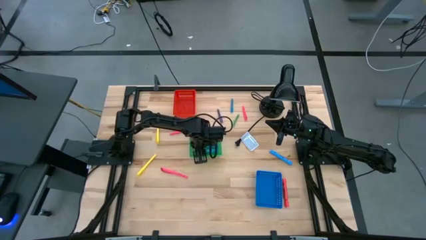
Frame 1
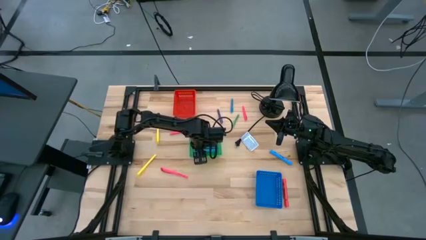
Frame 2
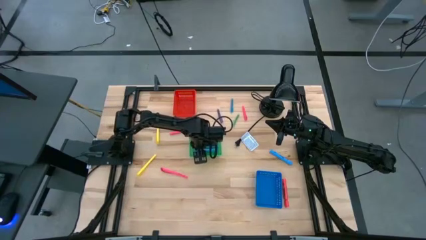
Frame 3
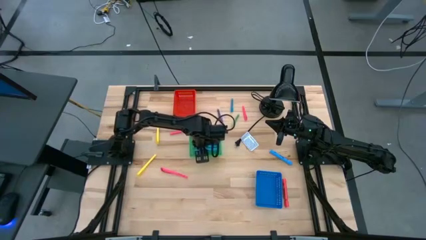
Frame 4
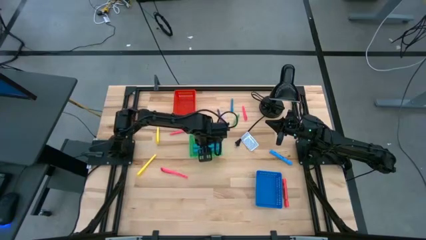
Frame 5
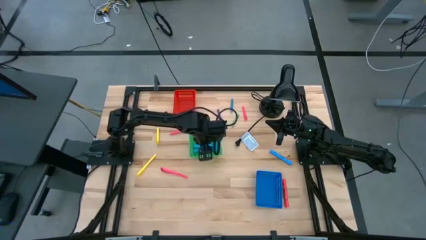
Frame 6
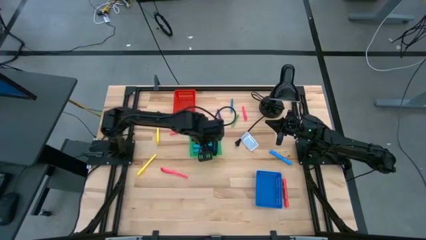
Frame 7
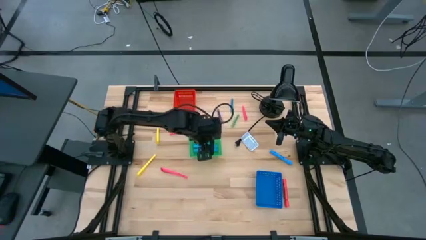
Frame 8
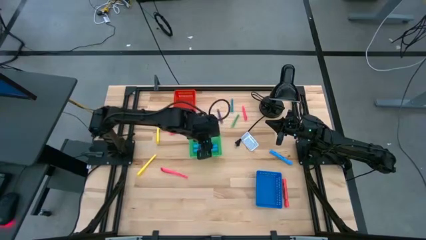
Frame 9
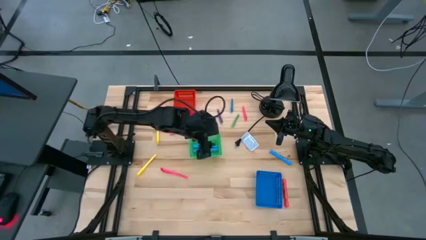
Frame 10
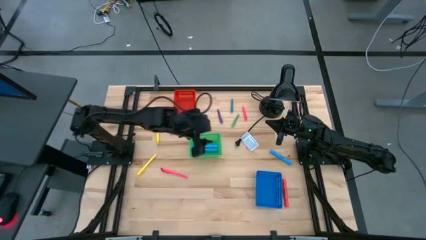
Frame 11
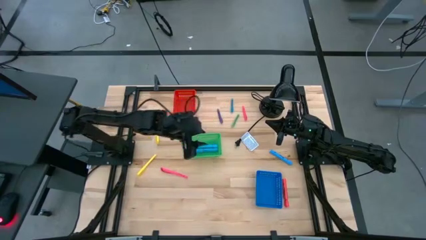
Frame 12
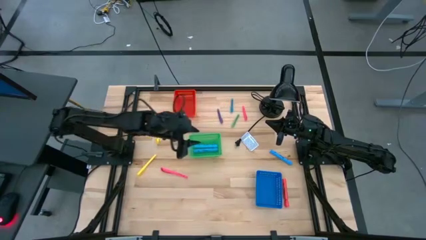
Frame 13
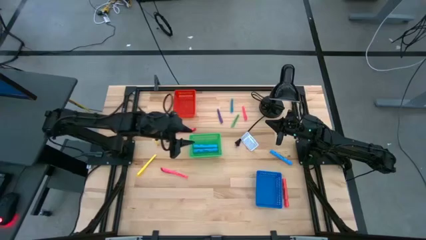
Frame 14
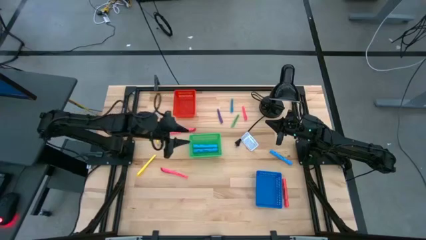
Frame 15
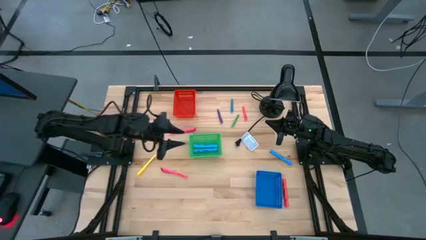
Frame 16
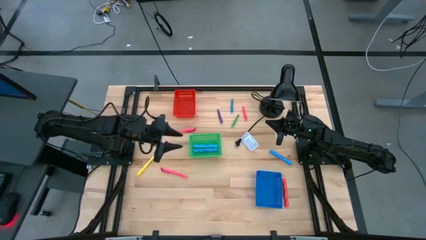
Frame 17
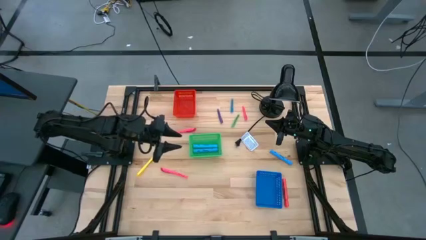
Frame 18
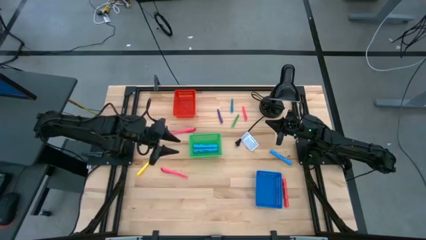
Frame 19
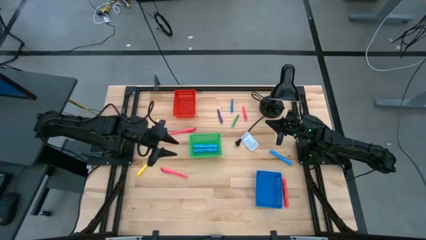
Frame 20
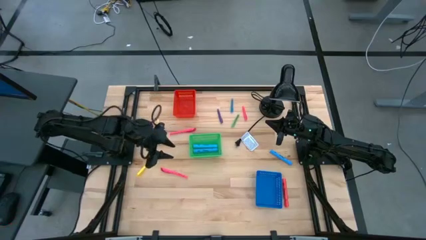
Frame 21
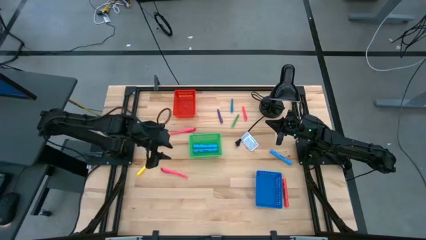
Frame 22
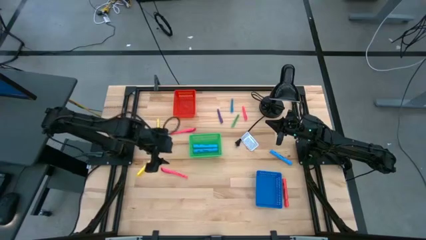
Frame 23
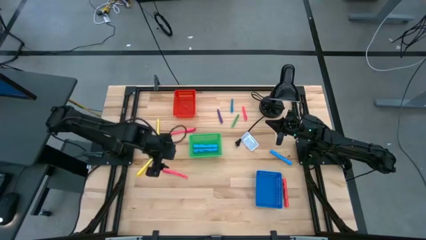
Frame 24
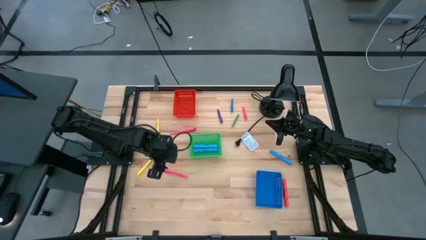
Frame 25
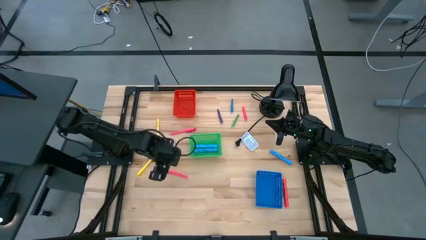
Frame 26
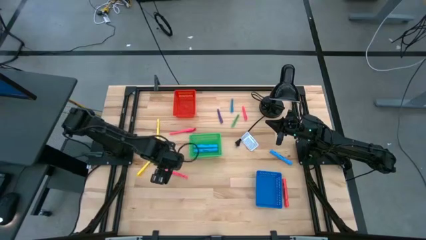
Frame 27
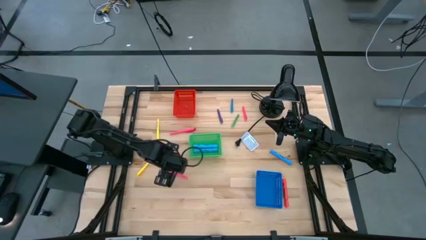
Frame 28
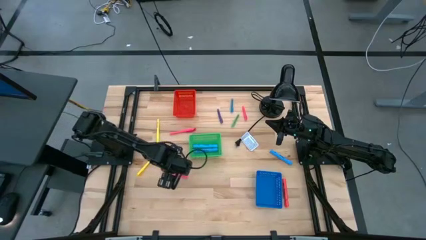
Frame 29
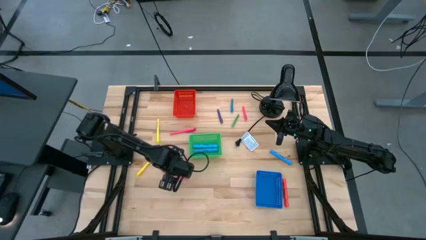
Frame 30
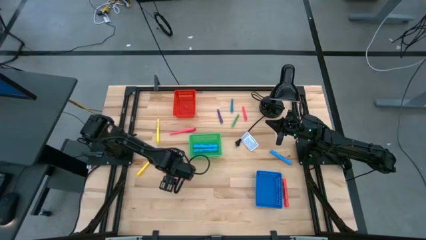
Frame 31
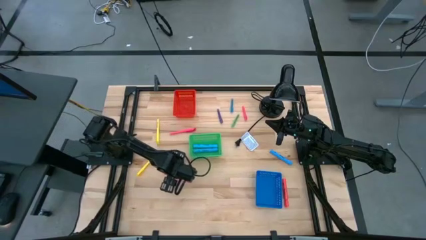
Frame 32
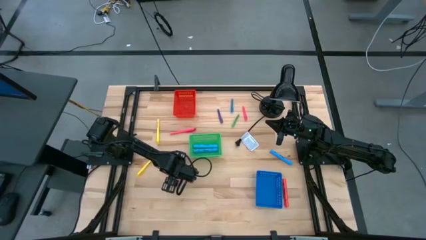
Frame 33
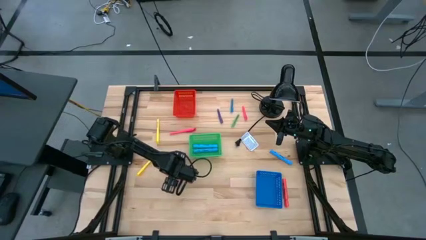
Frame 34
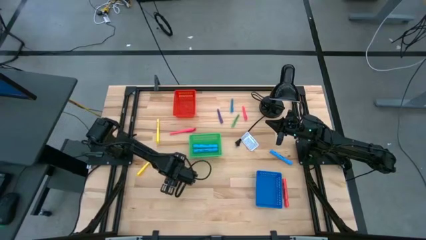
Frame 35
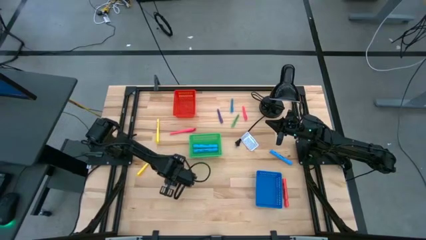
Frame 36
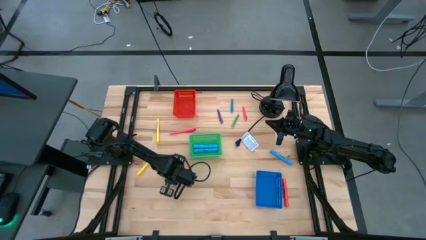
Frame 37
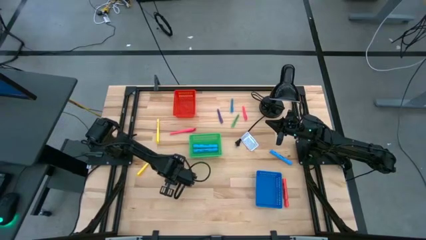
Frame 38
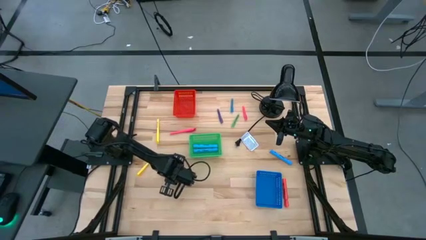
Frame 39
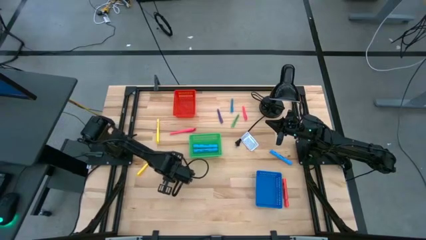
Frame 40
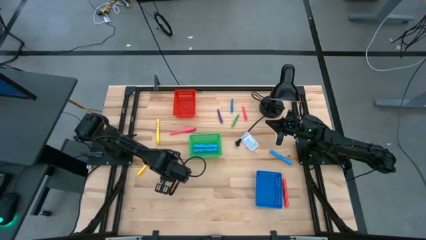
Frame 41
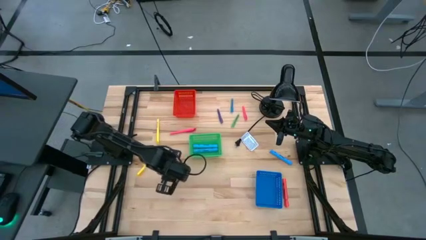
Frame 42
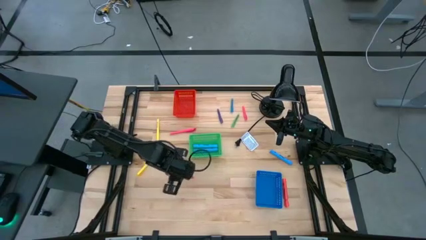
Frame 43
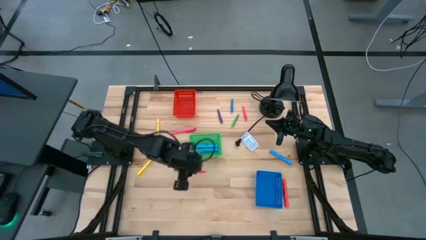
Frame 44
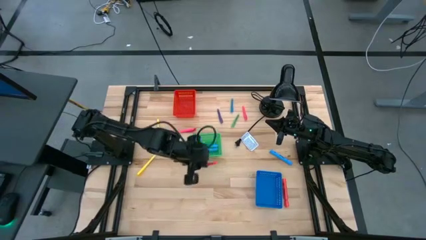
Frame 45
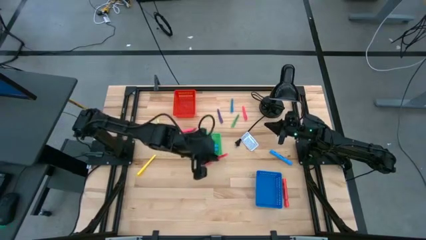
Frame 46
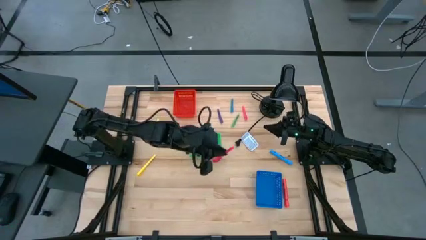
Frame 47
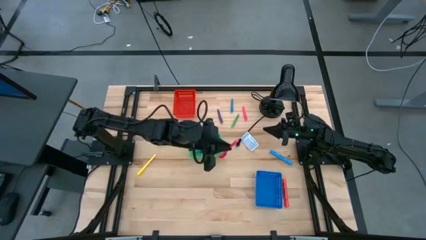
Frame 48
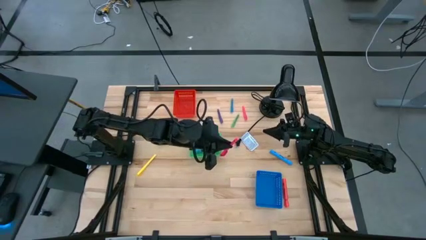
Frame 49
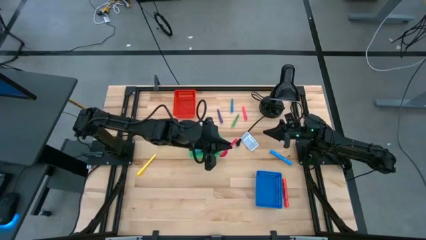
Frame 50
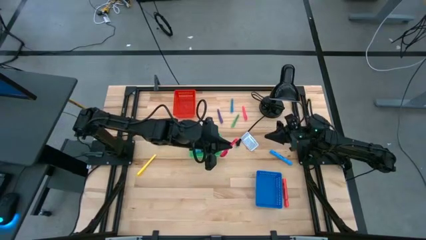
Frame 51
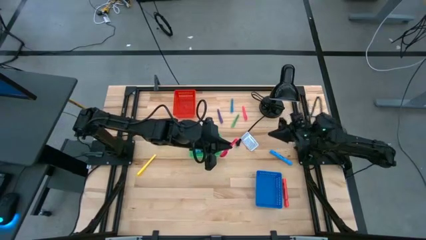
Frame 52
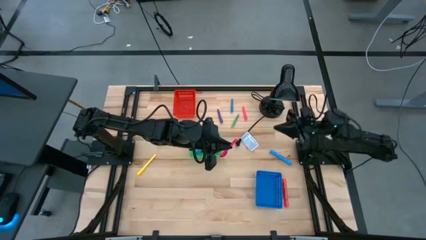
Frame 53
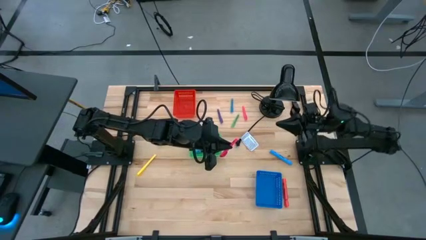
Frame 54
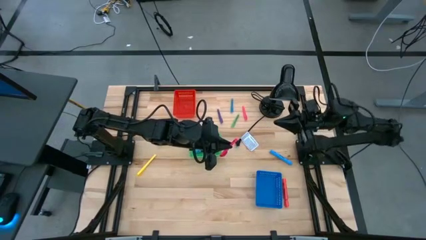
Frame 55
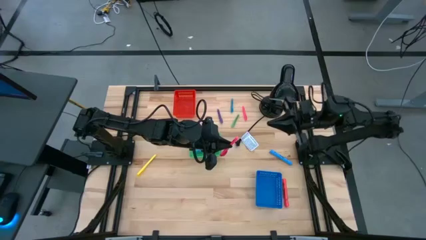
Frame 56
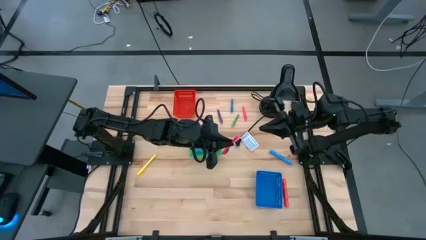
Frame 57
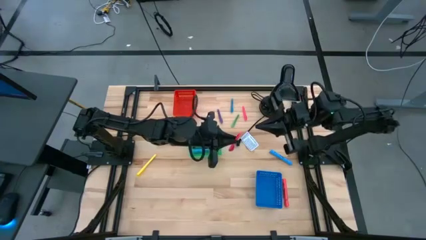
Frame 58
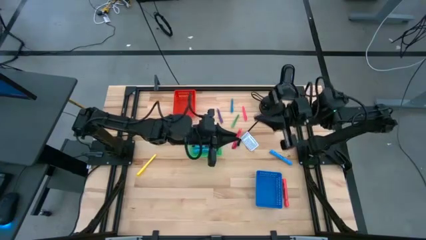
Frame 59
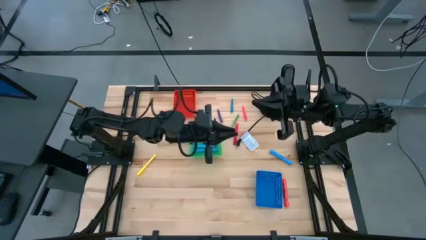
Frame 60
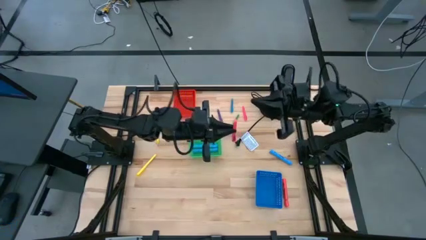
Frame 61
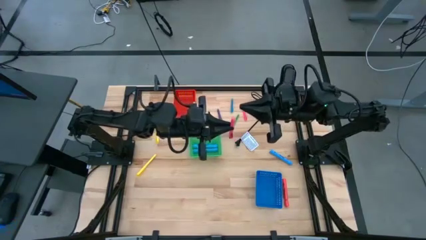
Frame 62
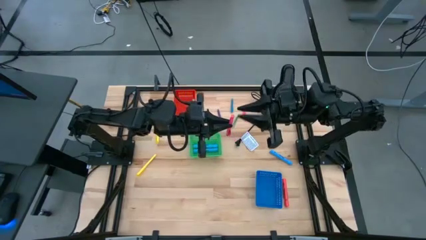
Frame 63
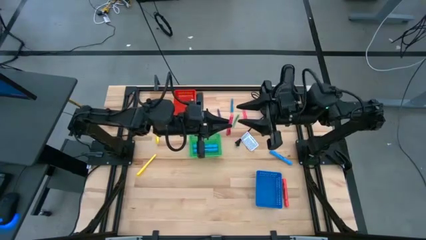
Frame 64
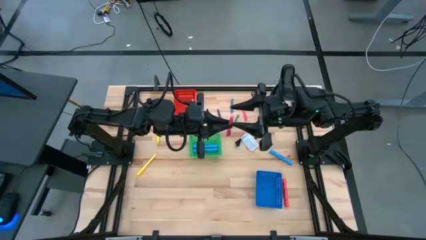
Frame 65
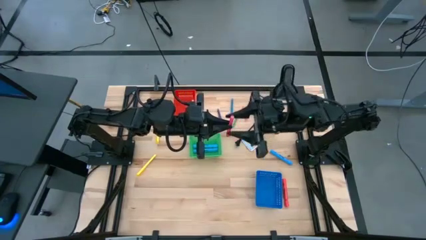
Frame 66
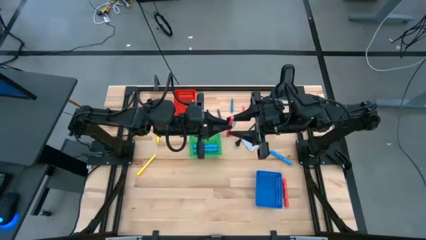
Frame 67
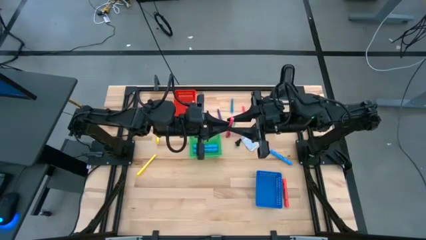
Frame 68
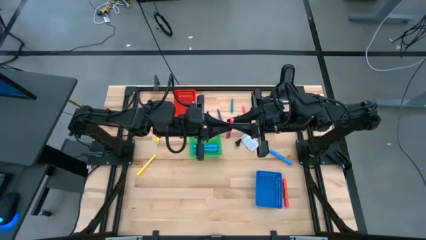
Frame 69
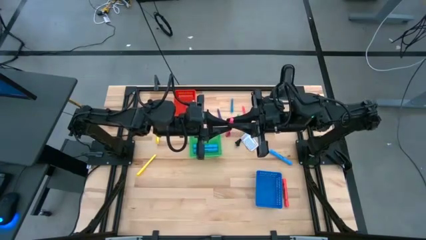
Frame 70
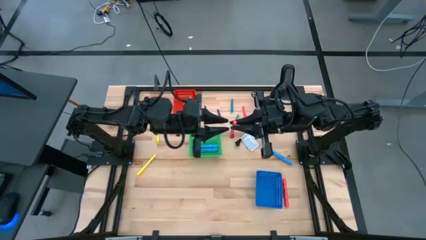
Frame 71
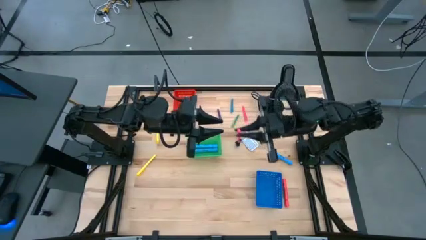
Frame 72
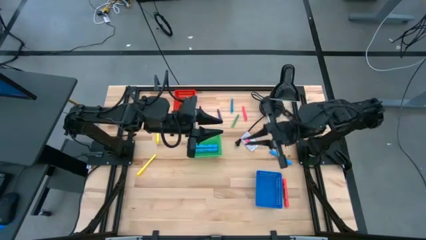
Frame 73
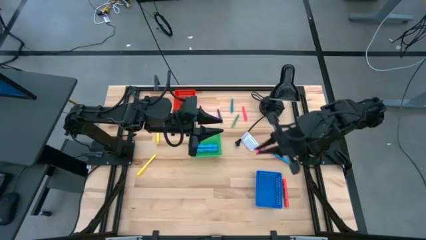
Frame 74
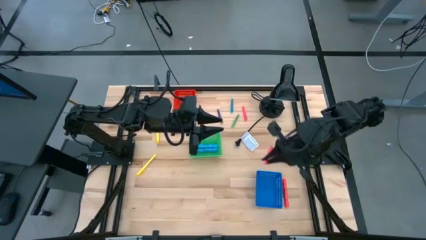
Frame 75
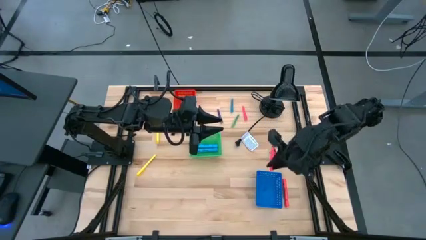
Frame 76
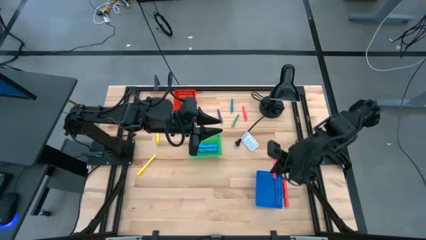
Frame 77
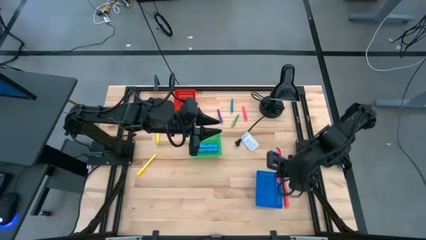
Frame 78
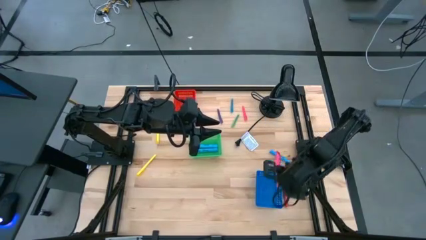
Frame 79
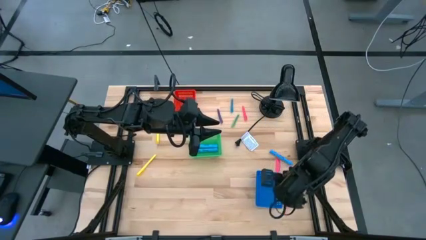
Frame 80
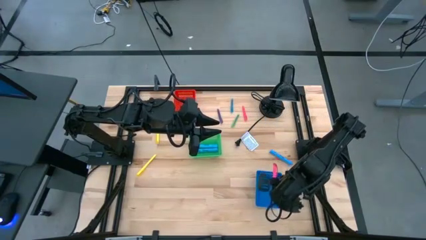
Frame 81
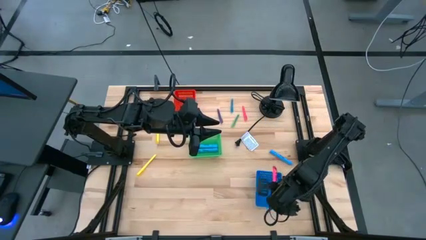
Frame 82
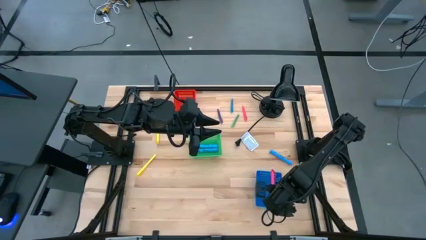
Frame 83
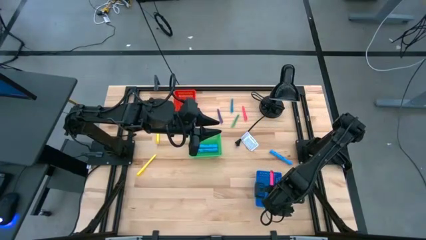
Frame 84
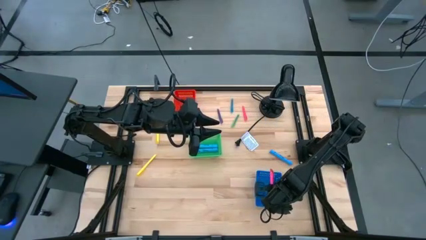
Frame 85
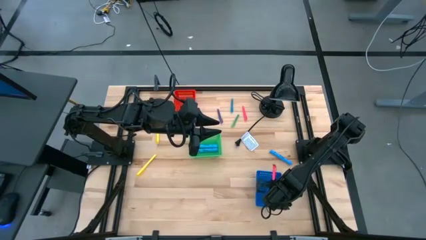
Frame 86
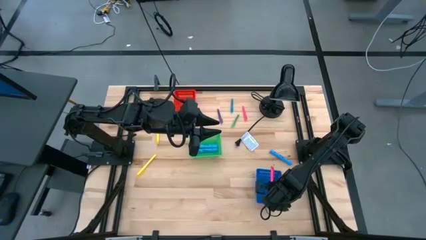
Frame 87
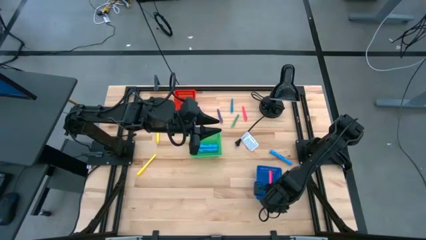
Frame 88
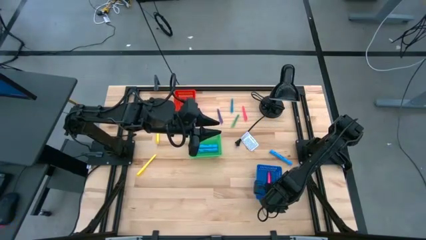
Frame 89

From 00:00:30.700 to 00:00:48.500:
Task: Pick & Place Markers
Put the bottom large pink pen into the blue bin
